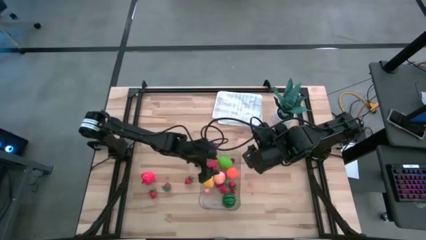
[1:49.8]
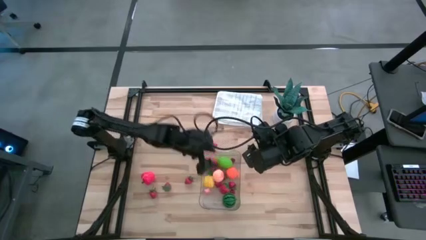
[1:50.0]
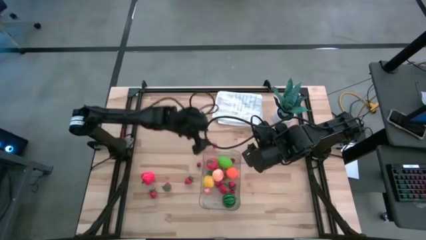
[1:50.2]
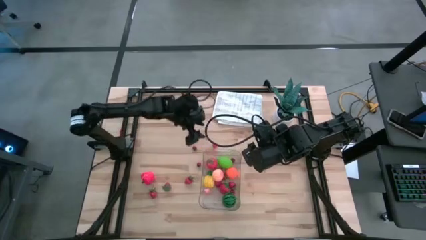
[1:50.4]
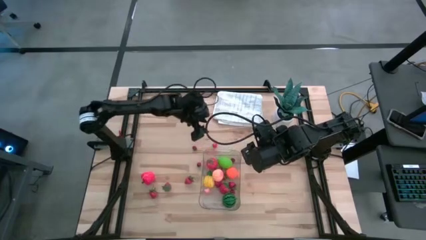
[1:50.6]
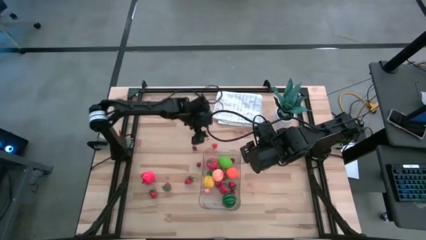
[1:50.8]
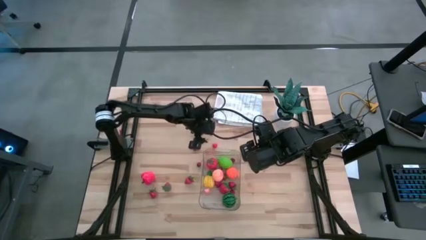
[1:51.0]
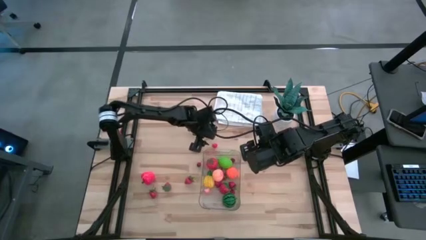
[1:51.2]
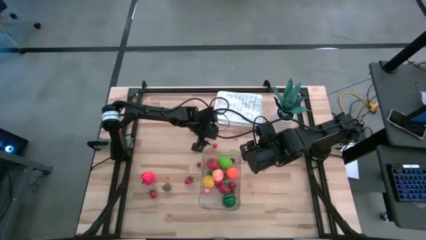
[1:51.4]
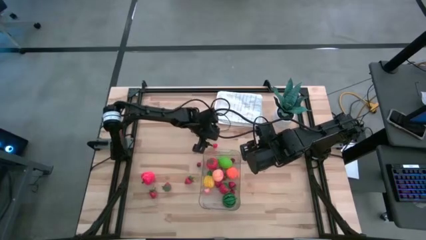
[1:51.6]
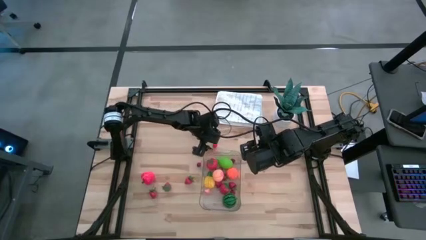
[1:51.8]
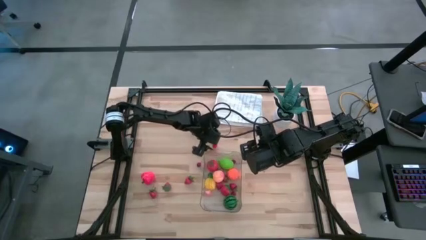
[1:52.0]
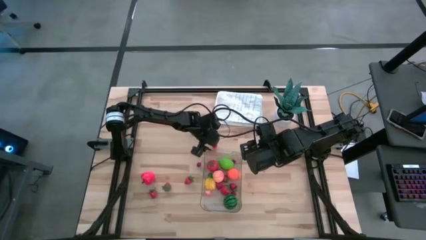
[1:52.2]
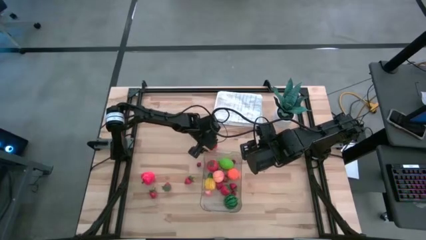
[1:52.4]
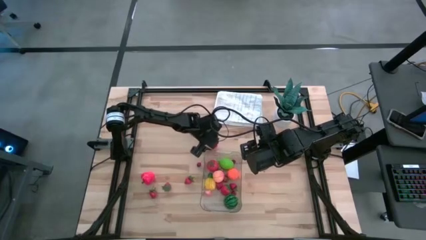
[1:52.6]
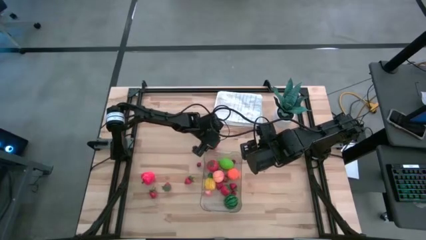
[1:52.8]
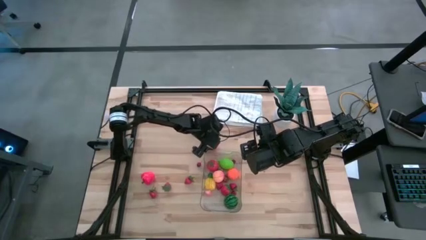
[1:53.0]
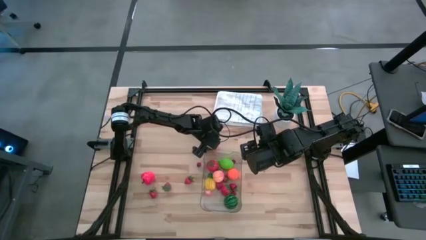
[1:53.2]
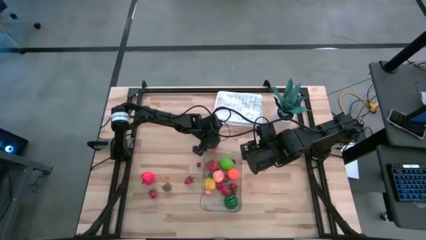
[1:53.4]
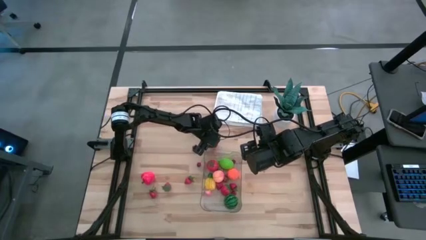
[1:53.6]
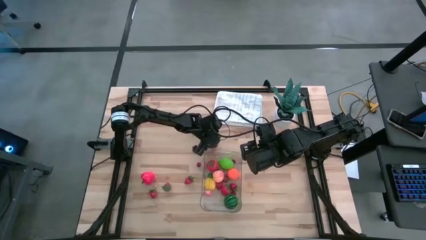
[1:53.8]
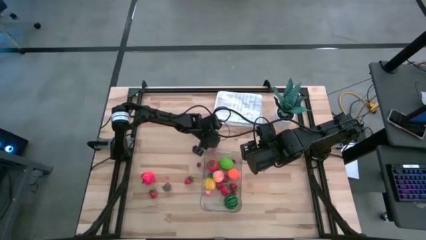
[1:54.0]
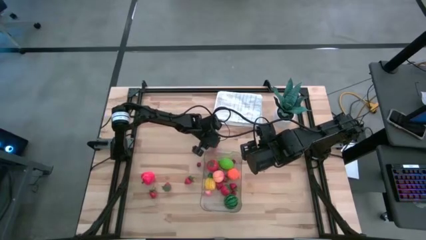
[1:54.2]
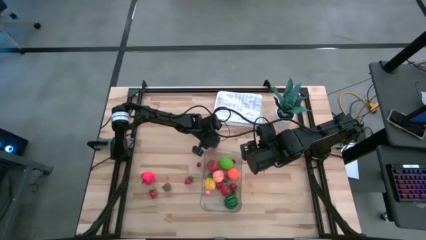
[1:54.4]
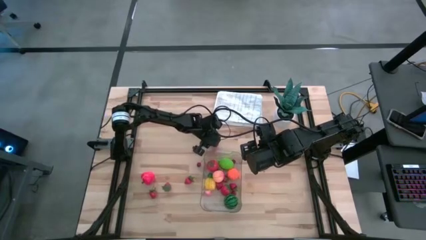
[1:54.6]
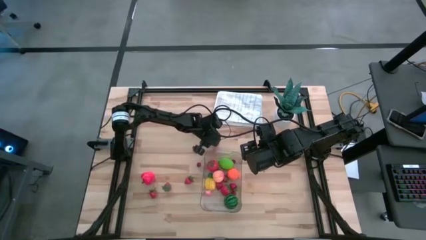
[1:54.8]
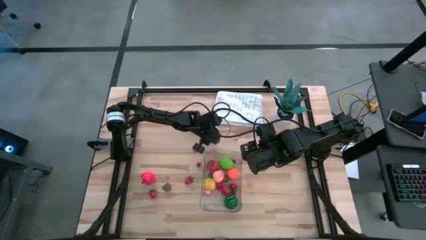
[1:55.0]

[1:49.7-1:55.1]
Task: Pick and placing Produce into tupperware
Put the red cherry into the transparent bin

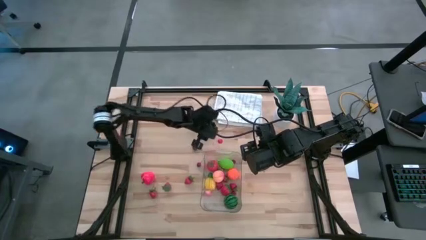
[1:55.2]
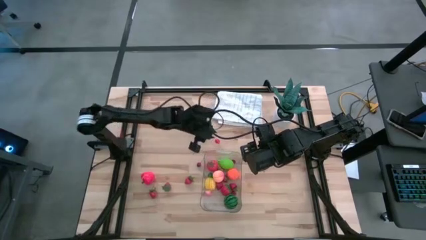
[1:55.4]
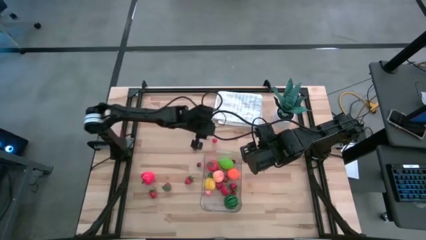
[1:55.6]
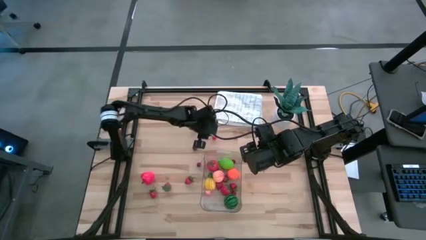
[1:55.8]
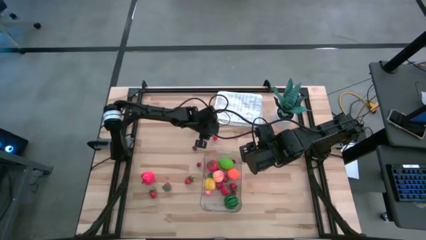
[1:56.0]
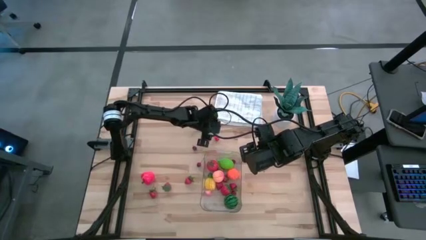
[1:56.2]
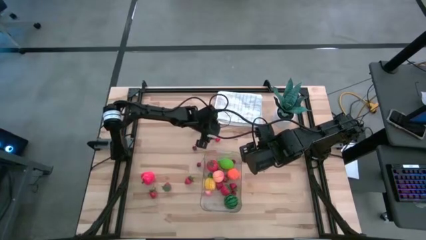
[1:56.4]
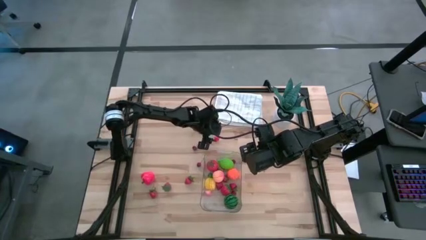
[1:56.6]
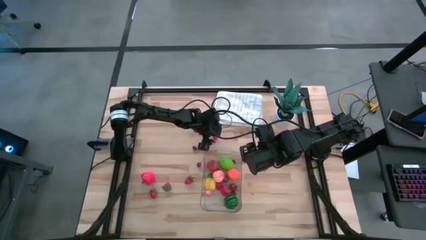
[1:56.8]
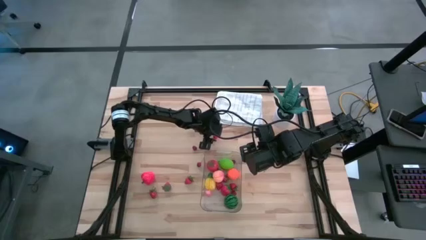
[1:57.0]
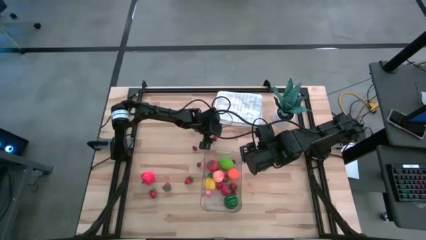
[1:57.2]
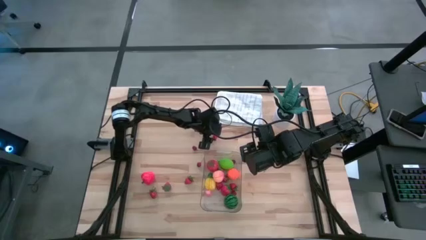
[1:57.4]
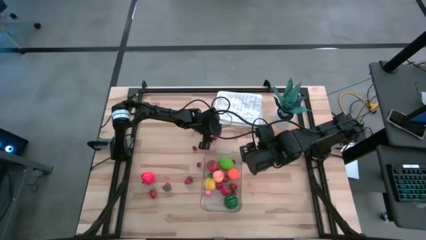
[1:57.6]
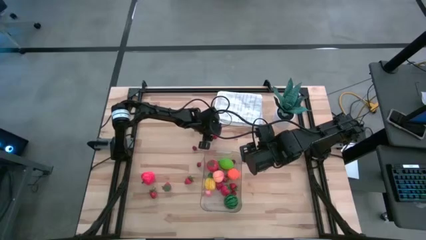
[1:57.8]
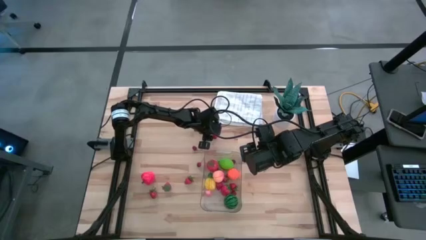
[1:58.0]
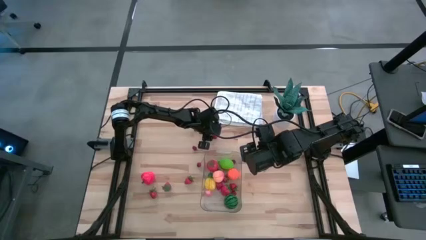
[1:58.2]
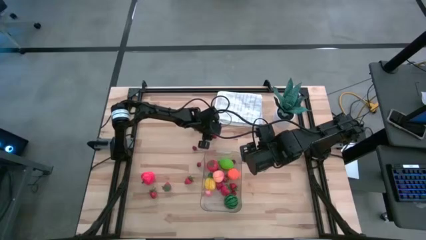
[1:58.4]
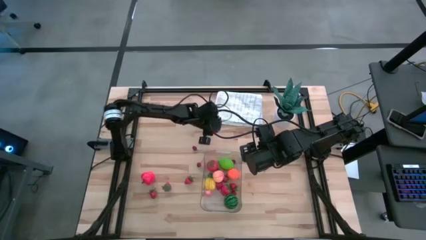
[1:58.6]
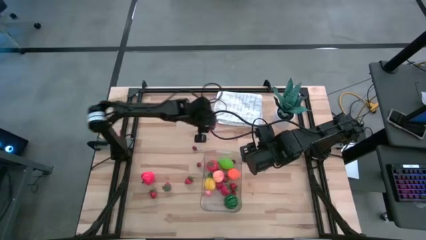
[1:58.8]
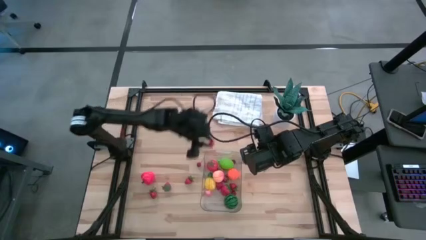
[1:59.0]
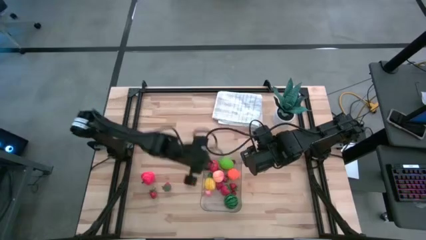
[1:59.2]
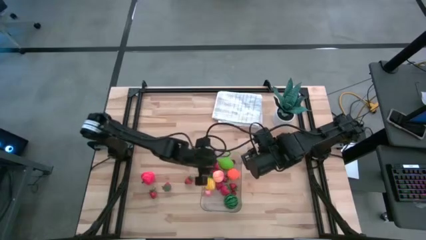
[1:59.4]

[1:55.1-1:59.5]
Put the red cherry into the transparent bin

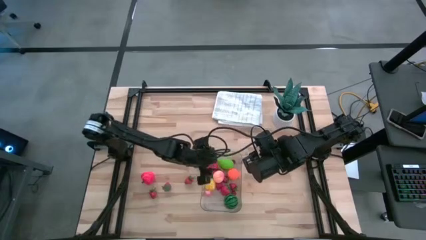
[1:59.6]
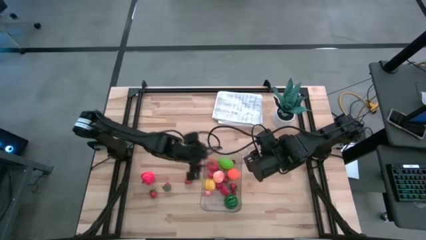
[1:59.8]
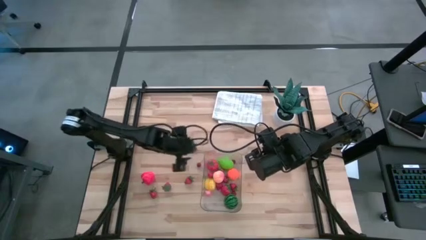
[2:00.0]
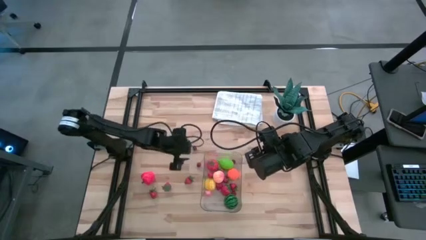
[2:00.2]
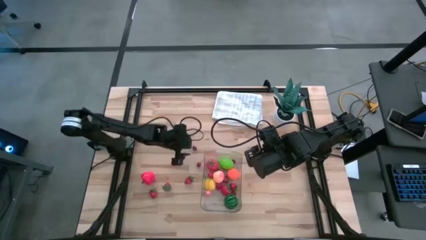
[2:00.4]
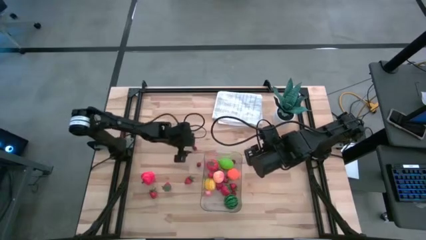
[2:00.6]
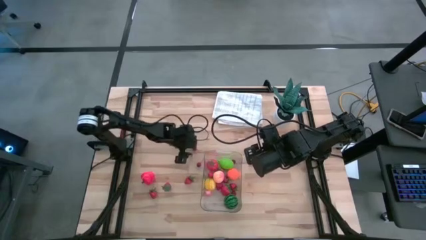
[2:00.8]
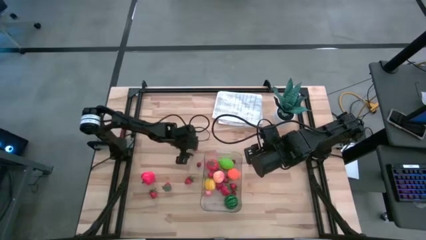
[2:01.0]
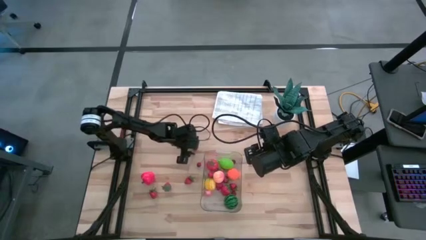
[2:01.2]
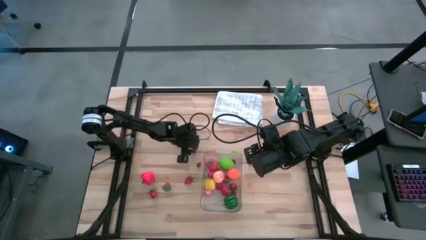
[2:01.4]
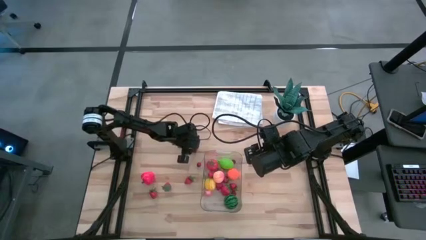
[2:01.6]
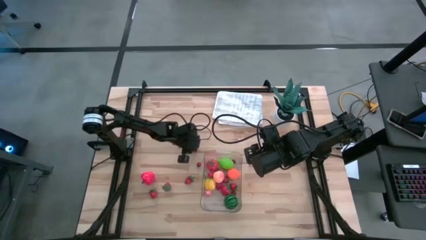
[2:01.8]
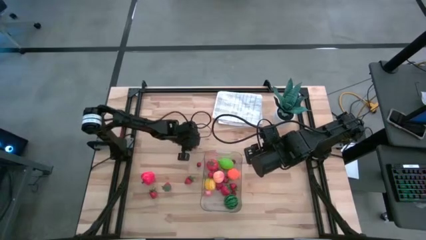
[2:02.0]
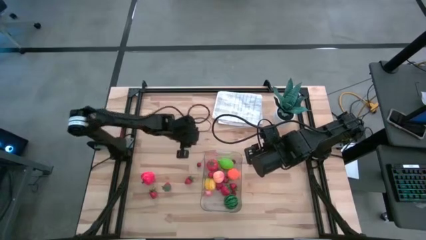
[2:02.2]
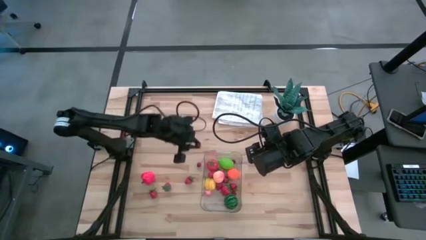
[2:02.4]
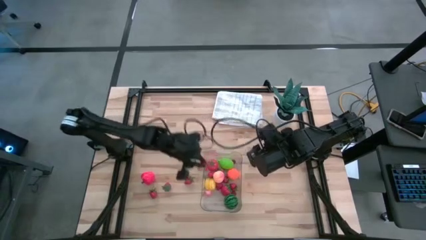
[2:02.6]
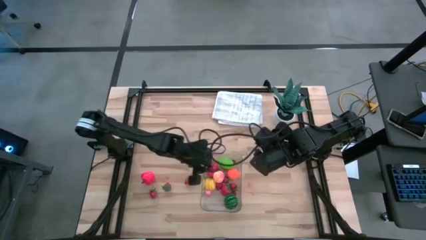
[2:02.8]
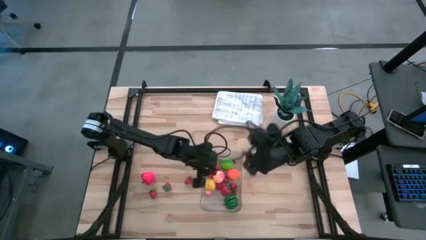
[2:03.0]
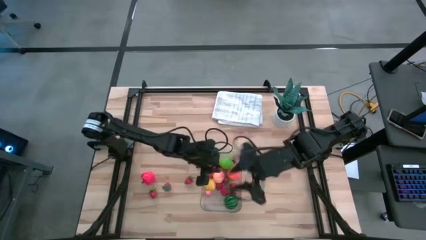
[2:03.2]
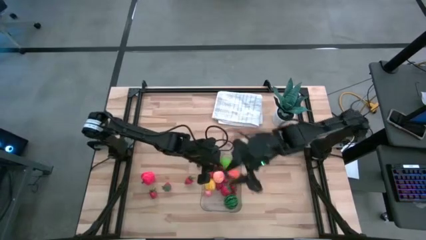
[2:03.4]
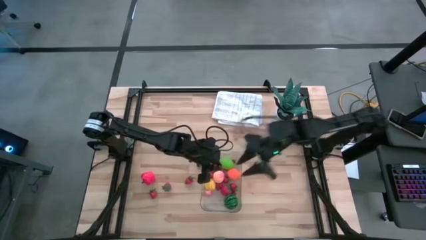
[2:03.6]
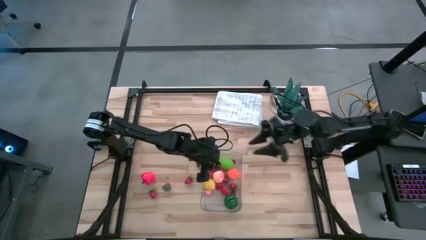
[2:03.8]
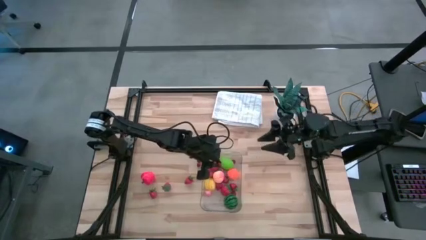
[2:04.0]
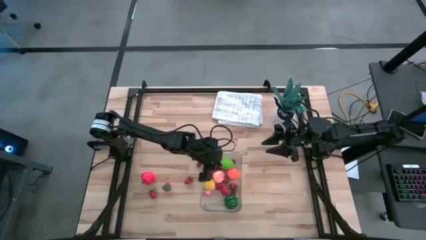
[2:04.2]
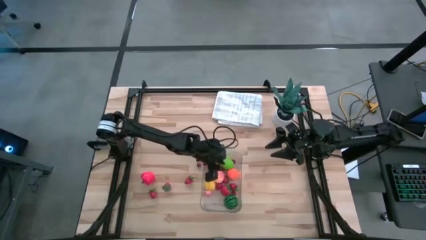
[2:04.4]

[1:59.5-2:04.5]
Put the red cherry into the transparent bin

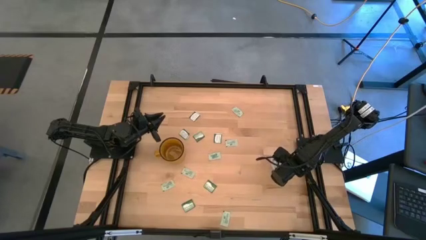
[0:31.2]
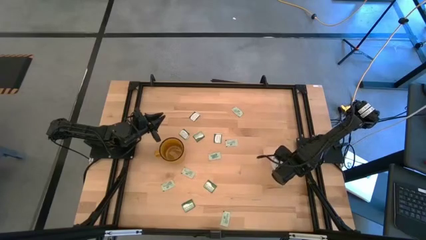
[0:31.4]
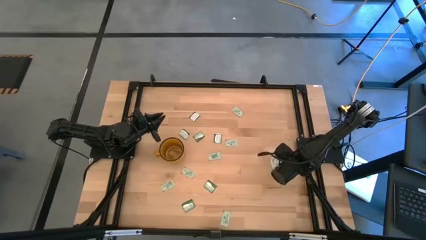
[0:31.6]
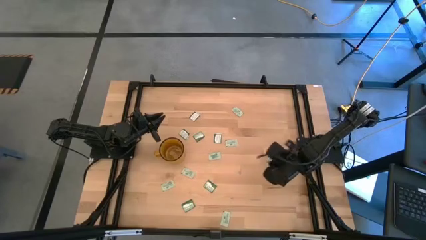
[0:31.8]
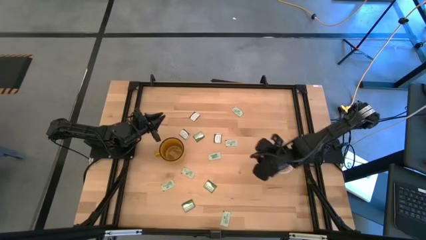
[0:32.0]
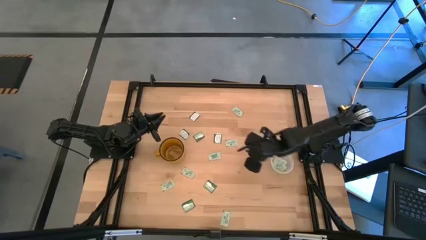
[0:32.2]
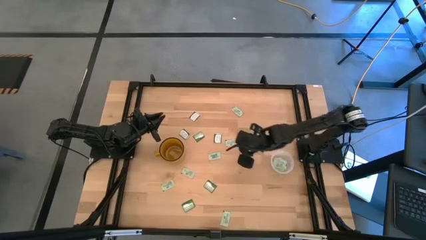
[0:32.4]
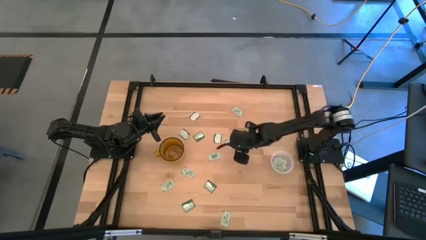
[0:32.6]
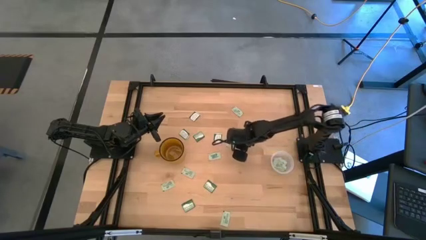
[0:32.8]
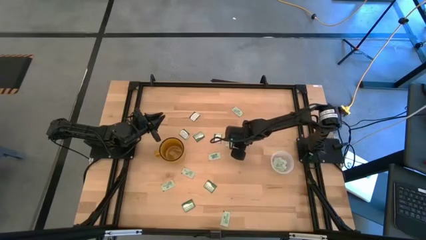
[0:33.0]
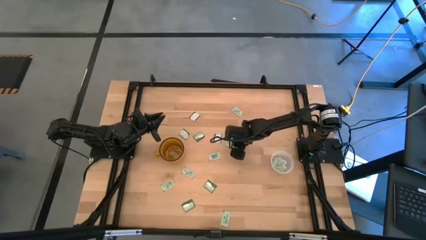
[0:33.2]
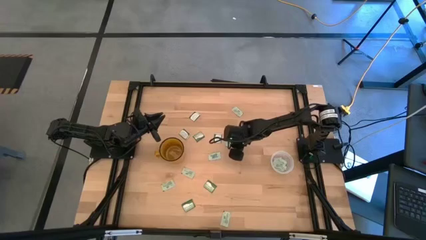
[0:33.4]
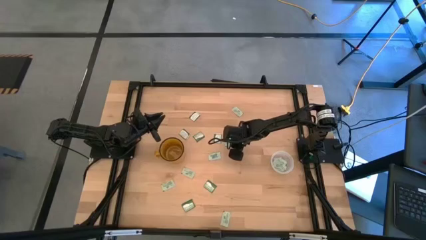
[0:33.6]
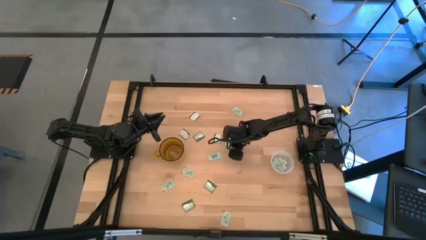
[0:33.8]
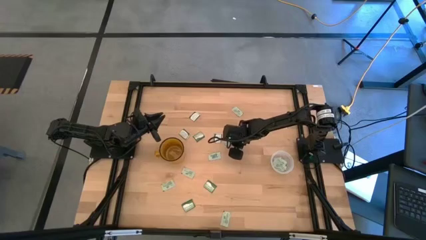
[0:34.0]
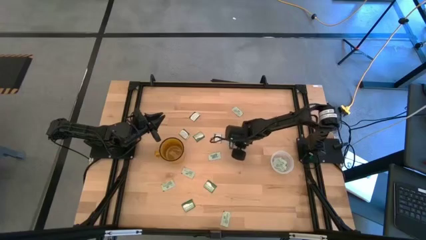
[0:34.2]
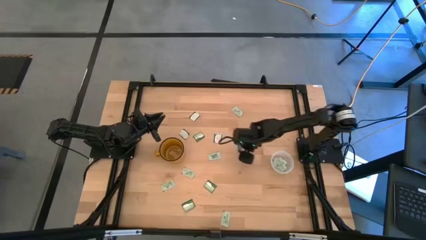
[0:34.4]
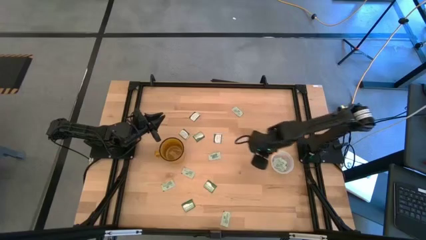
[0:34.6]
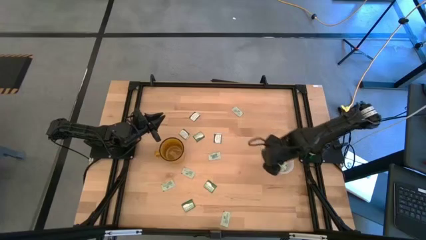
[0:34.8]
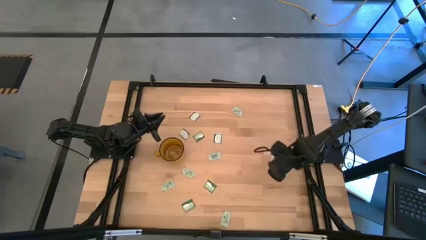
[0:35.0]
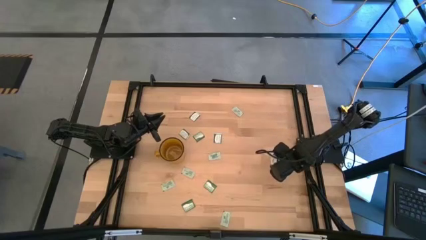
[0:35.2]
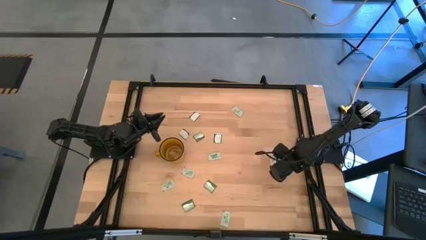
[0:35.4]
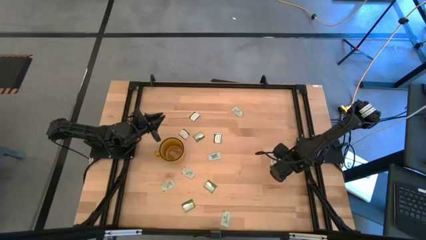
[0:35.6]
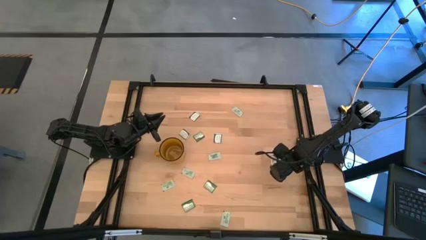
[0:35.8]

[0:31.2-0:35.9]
Task: Pick and place Stevia / Truvia into bins
Put the green stevia packet into the transparent container
